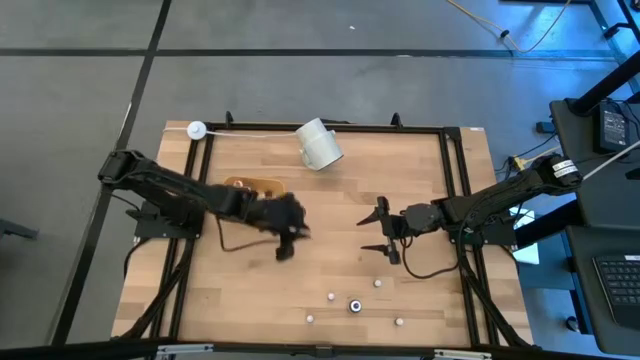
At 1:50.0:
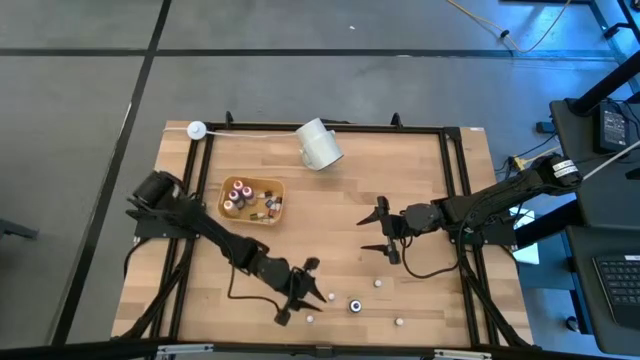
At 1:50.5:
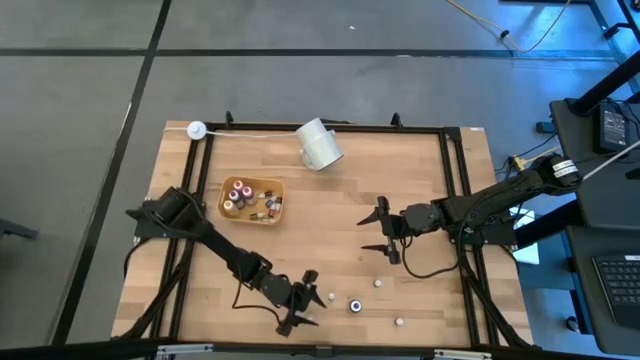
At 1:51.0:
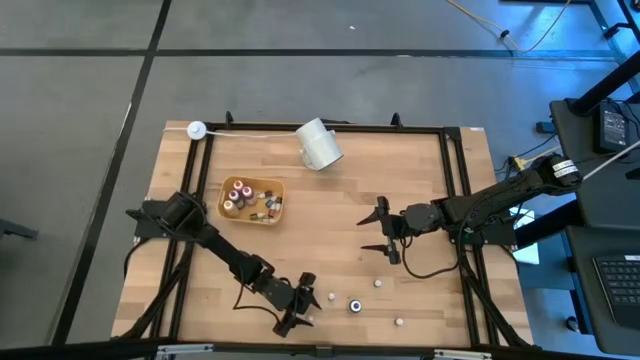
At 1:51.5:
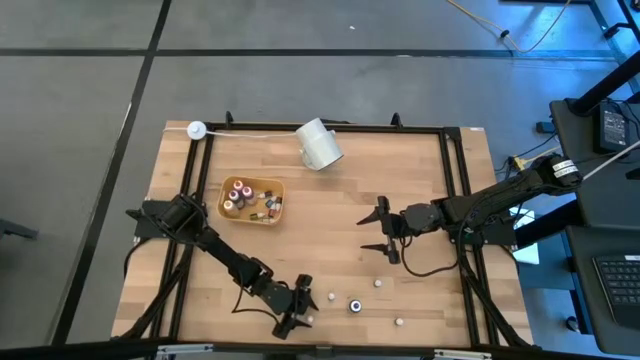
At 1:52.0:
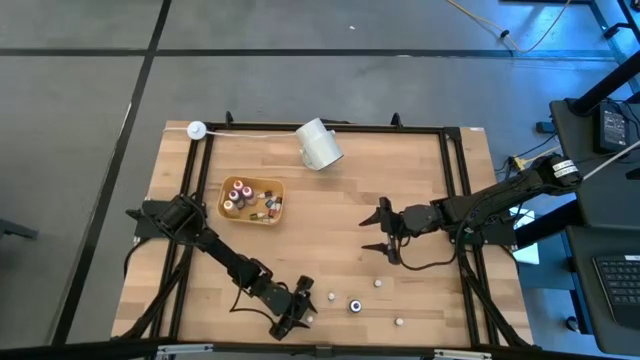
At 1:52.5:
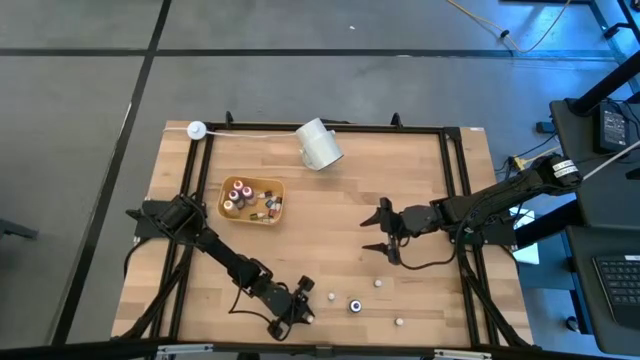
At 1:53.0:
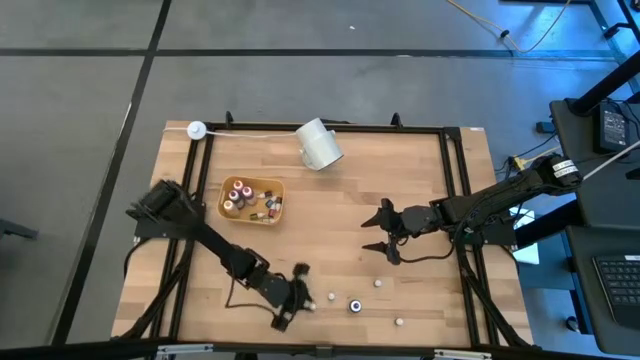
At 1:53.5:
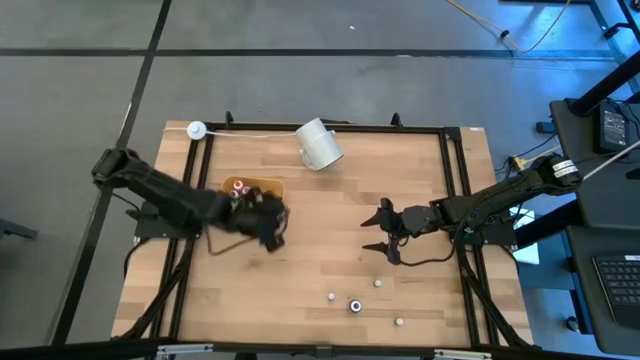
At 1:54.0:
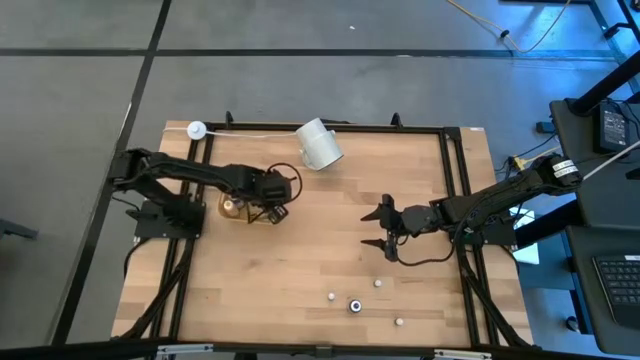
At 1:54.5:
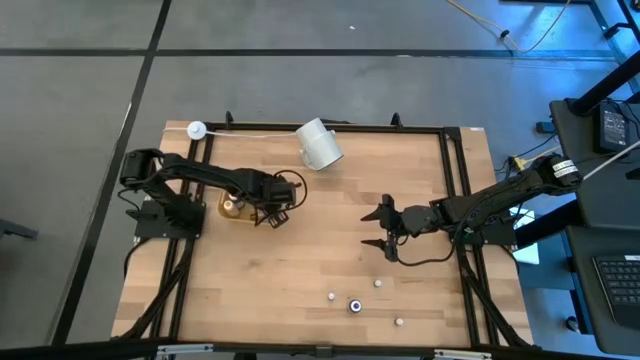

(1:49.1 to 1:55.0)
Task: Pick & Place food coloring
Put the small purple food coloring bottle into the bin

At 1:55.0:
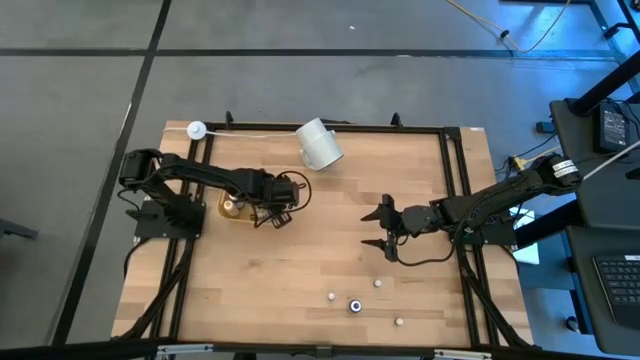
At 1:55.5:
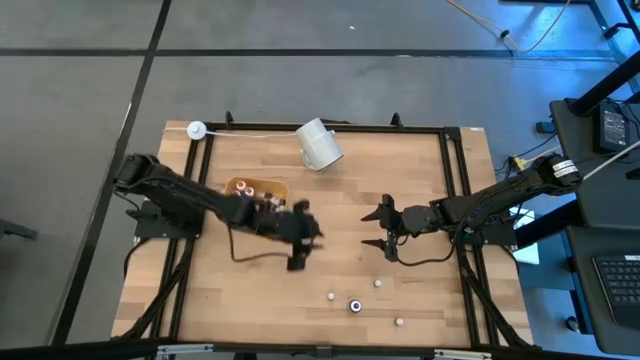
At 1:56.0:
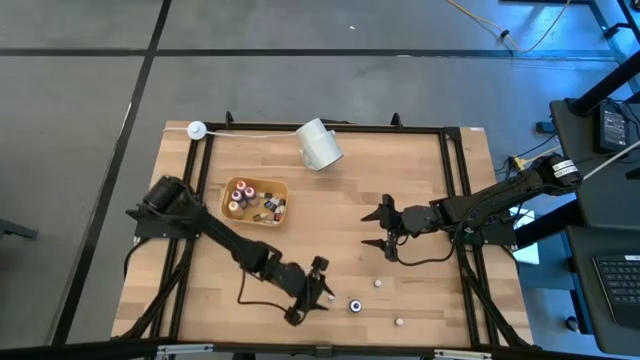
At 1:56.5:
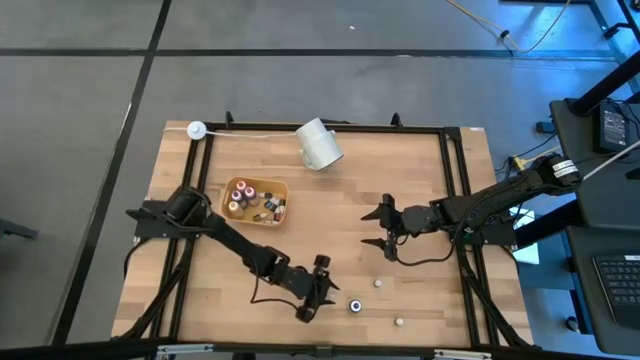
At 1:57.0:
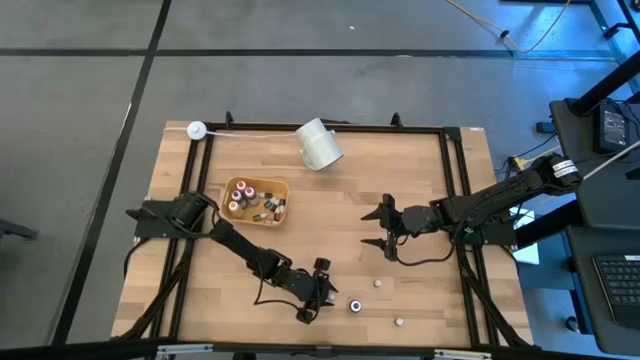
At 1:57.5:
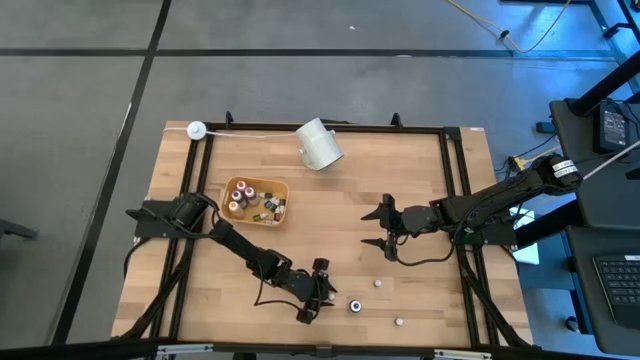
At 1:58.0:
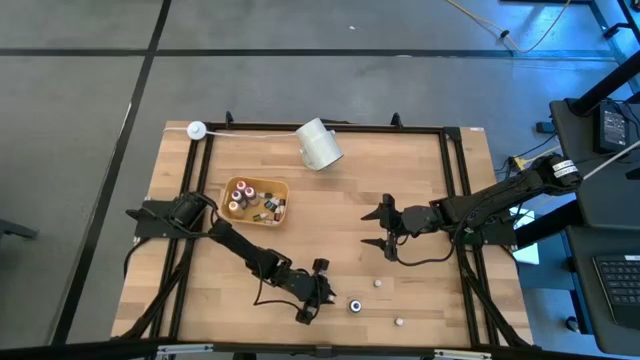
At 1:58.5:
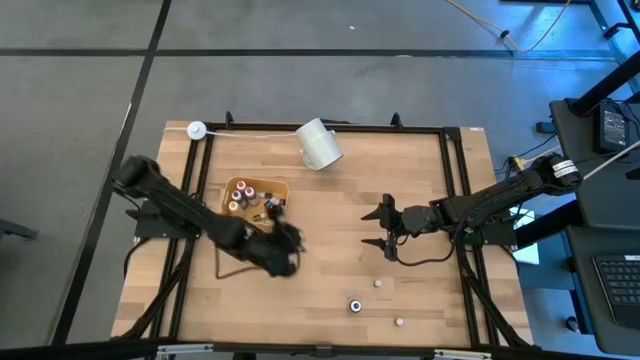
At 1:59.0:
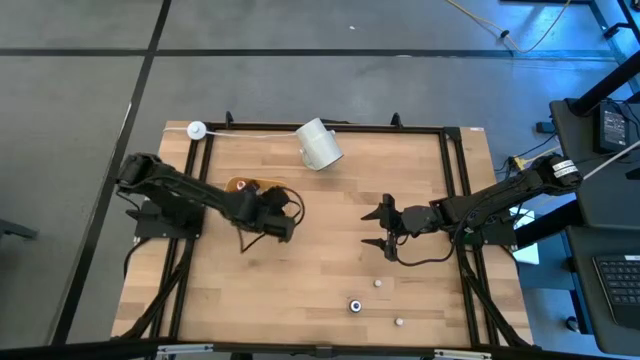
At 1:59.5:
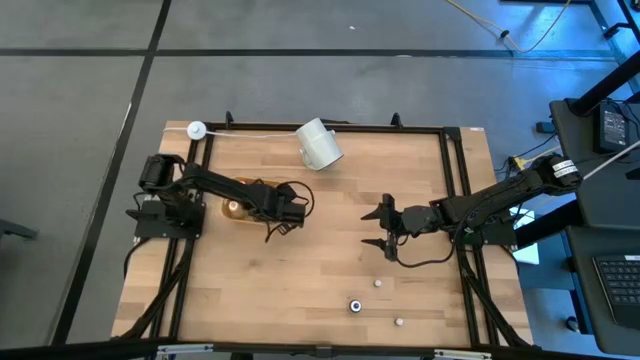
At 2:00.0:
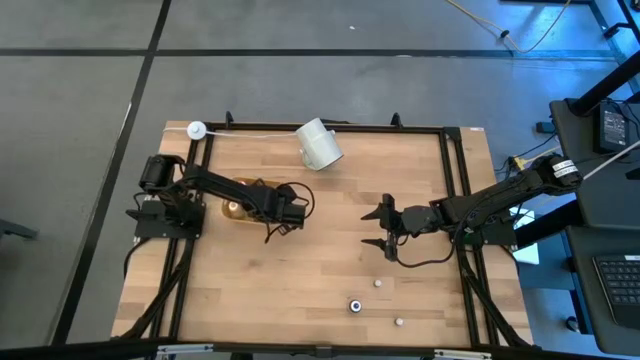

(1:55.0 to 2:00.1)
Put the small red food coloring bottle into the bin

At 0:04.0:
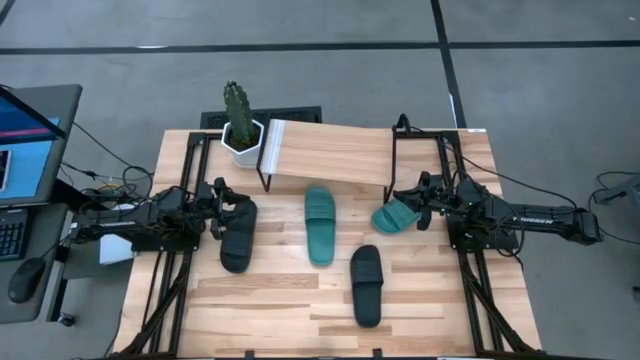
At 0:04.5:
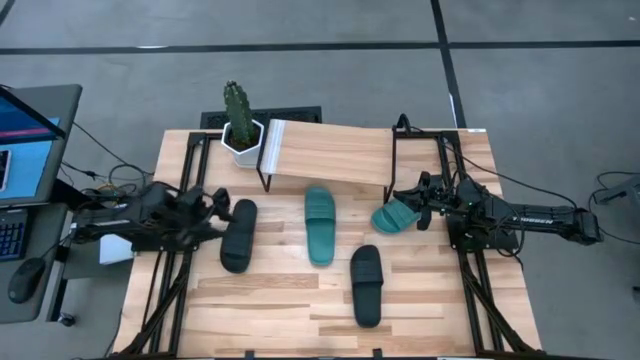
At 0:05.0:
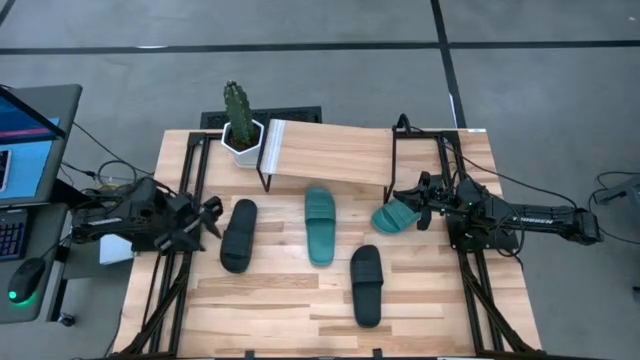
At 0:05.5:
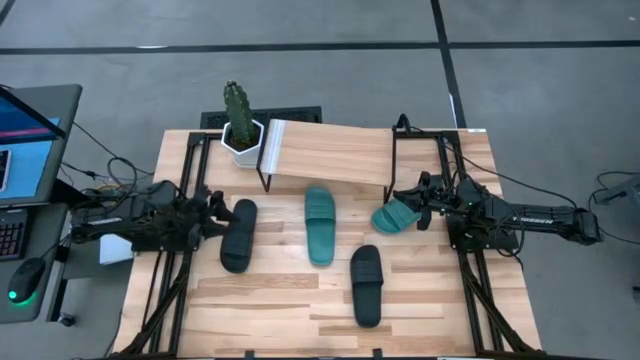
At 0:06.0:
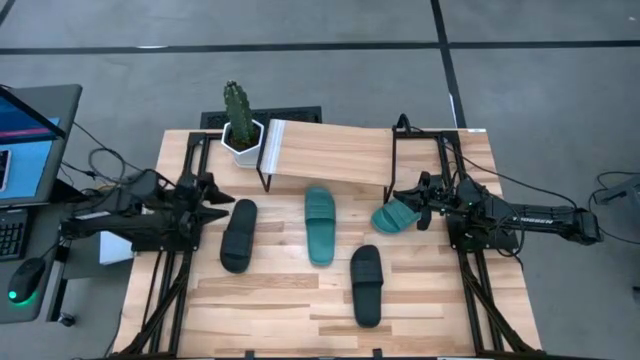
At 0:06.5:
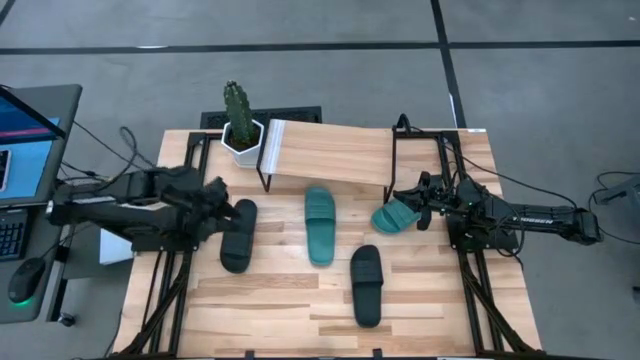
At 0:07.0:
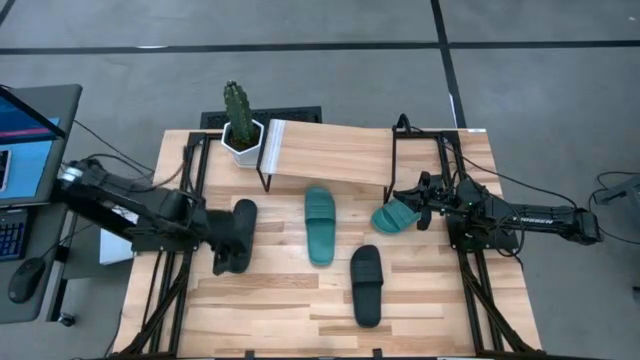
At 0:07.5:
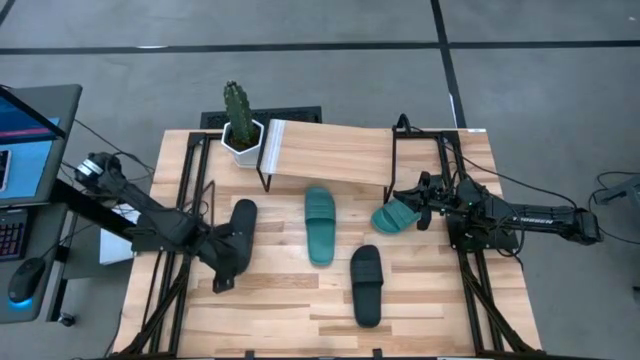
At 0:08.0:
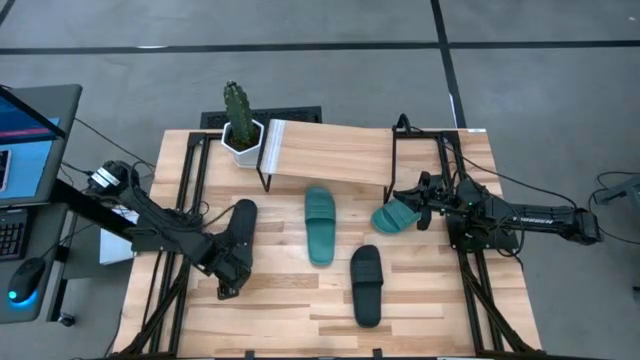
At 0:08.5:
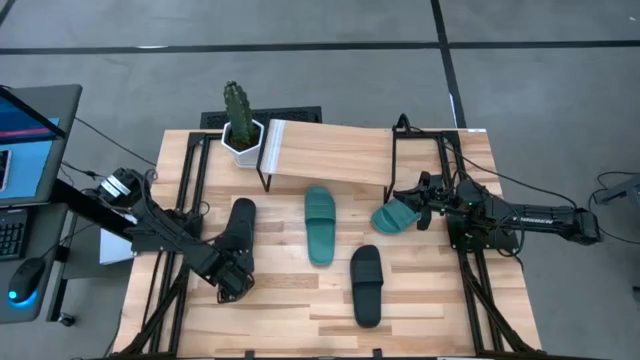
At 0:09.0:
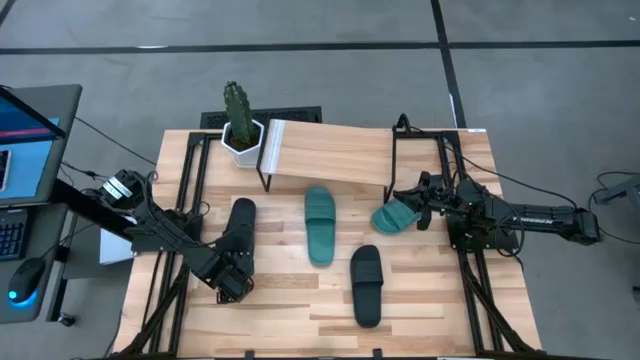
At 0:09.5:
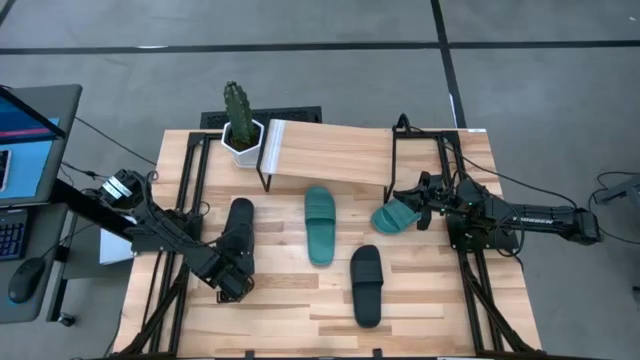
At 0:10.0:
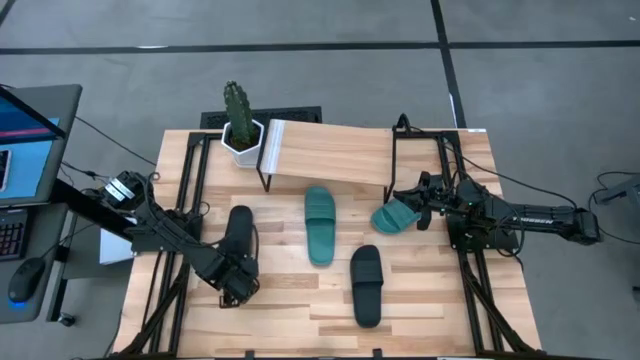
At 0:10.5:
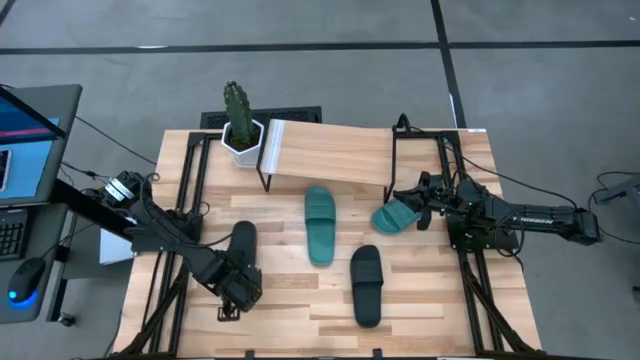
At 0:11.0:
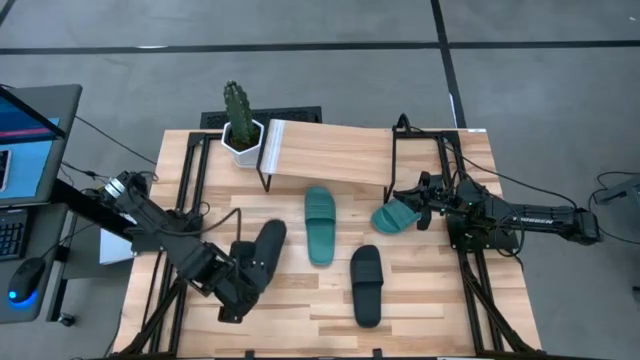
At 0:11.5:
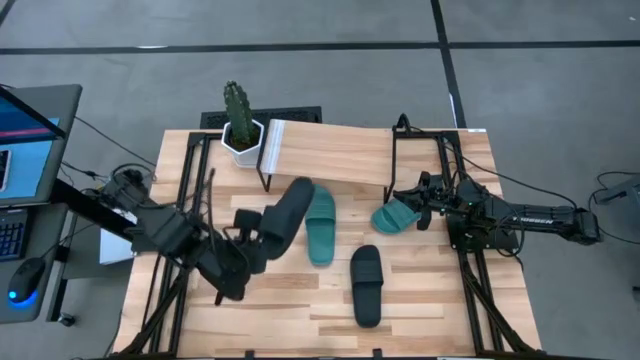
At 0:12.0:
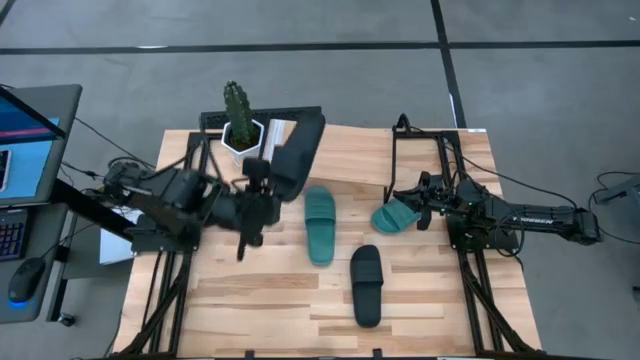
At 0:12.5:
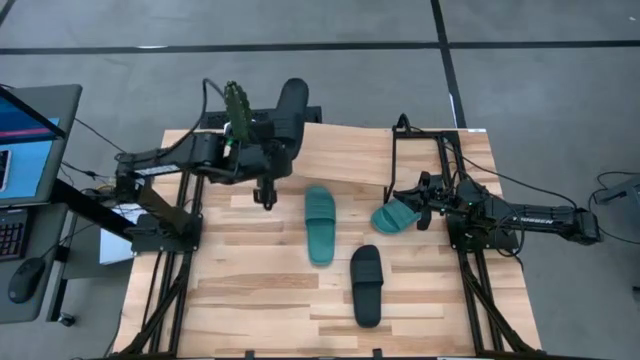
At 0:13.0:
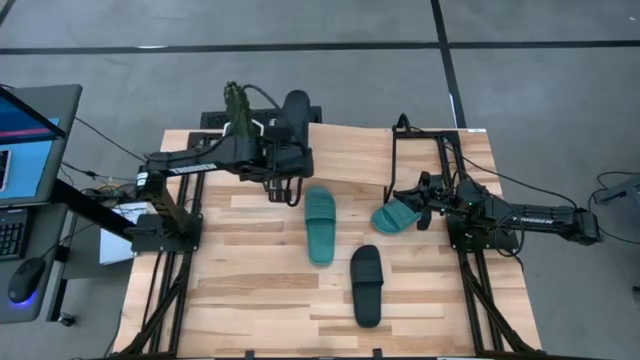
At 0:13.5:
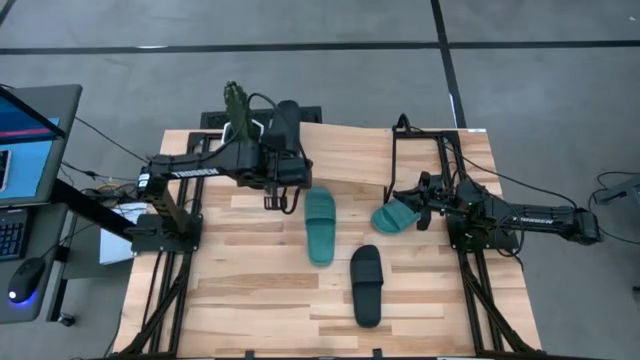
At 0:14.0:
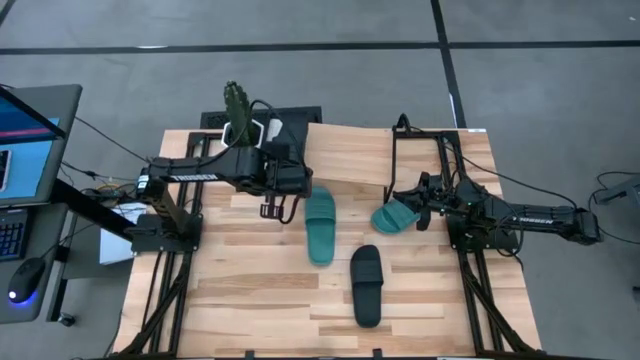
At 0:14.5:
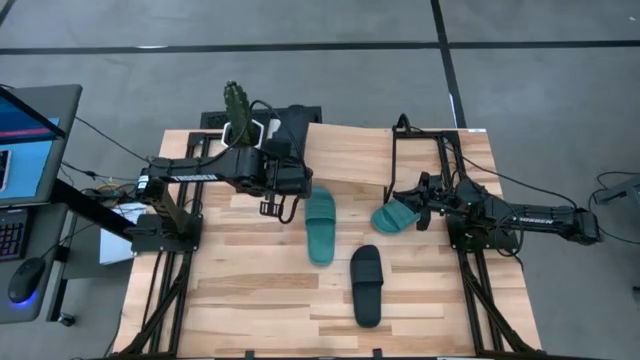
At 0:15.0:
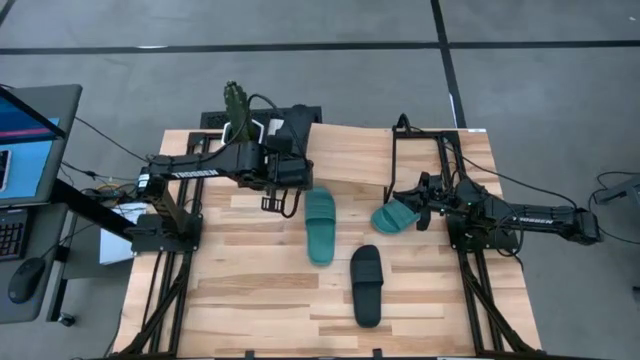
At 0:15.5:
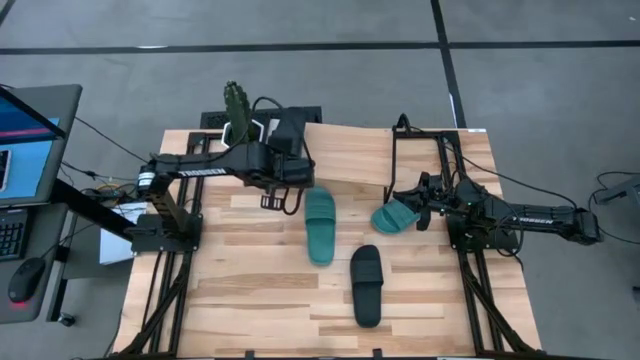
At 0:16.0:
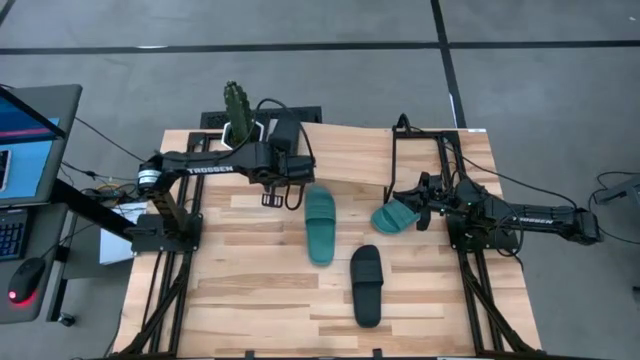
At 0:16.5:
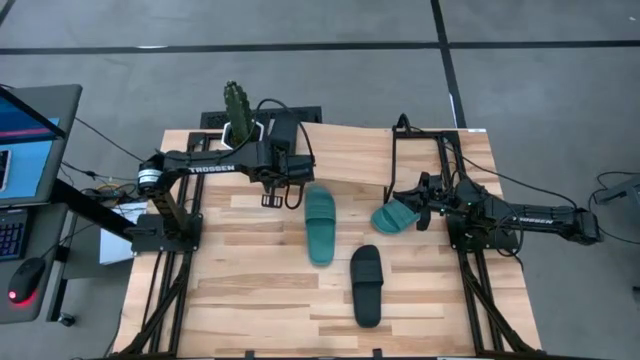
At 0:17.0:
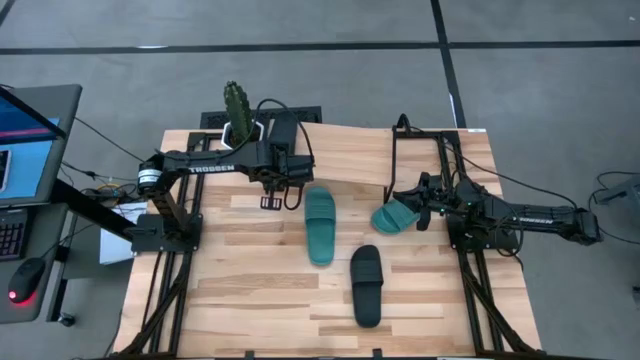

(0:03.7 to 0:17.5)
Task: Pick and place slides into the shelf
Put the left black slides on the shelf
